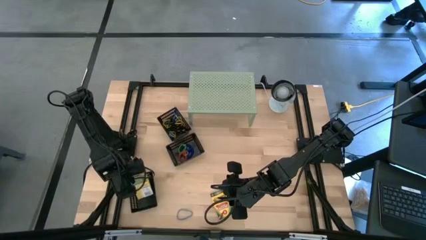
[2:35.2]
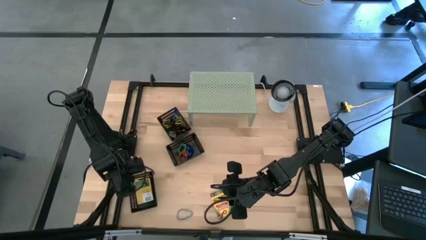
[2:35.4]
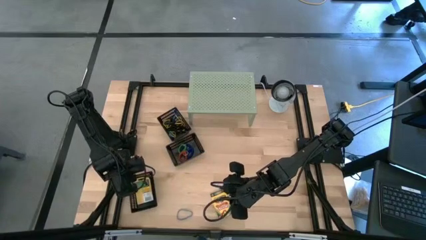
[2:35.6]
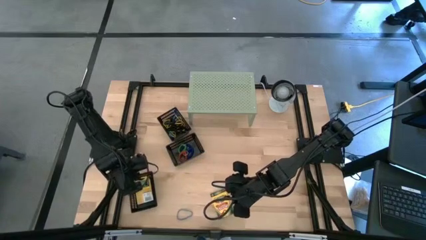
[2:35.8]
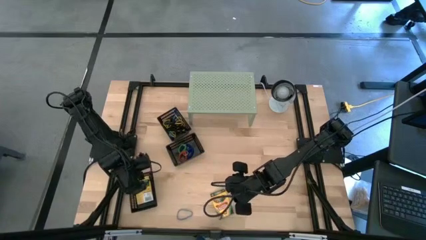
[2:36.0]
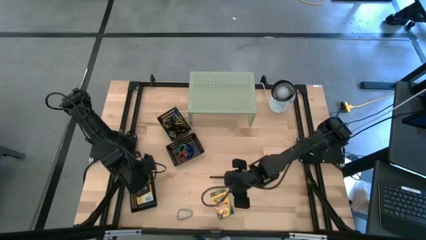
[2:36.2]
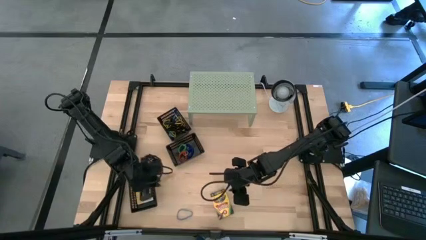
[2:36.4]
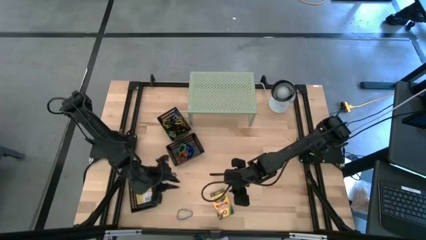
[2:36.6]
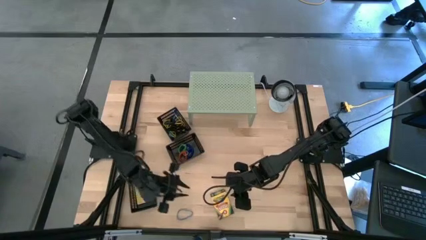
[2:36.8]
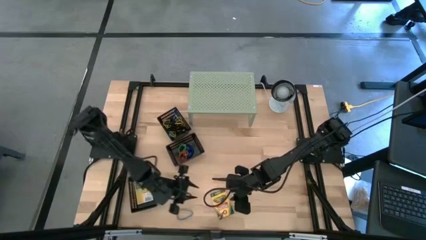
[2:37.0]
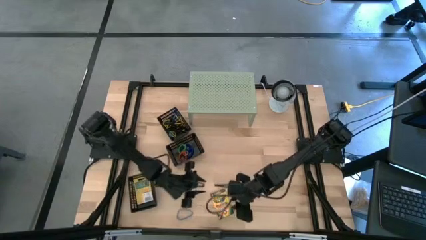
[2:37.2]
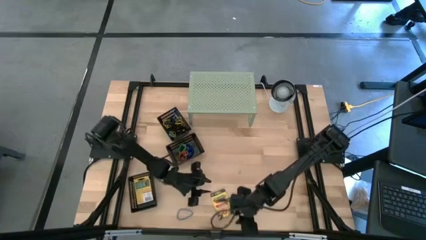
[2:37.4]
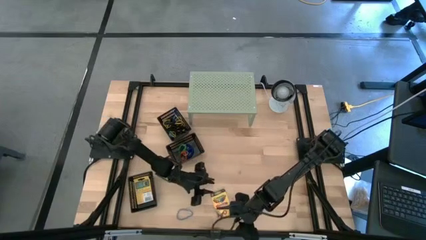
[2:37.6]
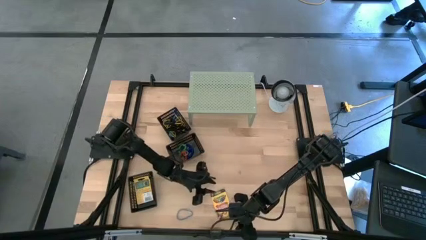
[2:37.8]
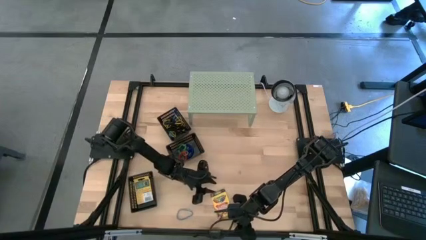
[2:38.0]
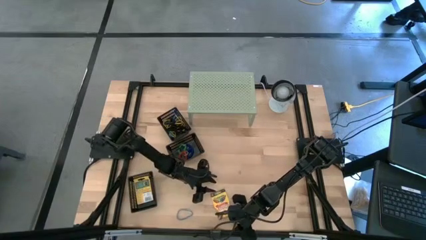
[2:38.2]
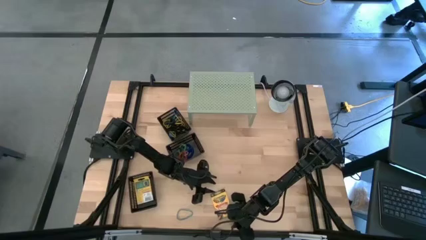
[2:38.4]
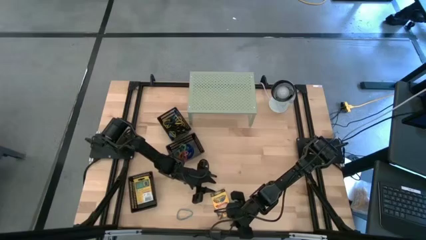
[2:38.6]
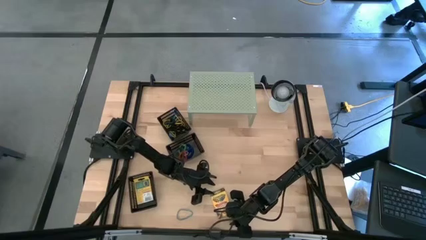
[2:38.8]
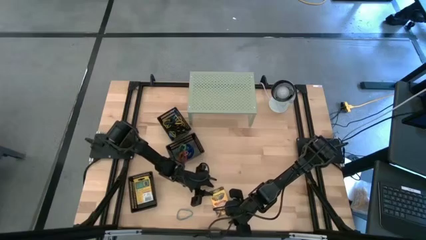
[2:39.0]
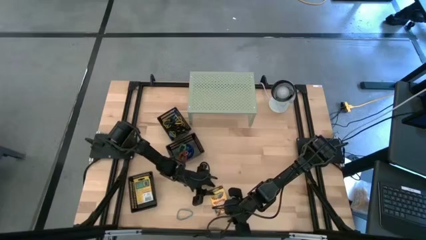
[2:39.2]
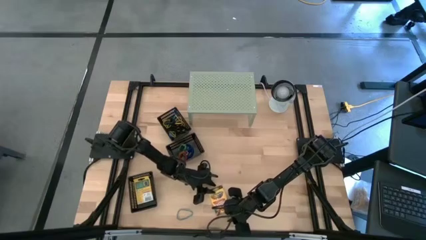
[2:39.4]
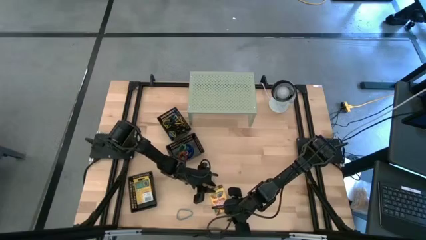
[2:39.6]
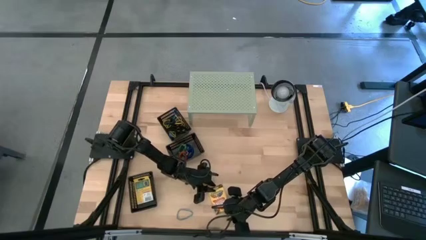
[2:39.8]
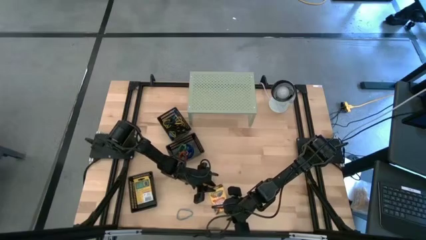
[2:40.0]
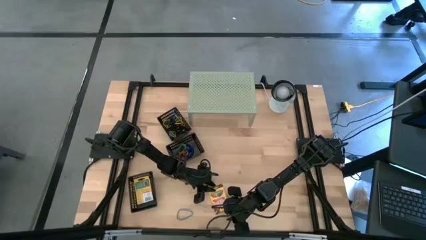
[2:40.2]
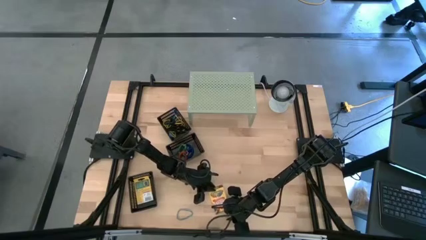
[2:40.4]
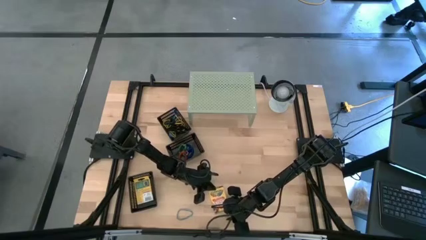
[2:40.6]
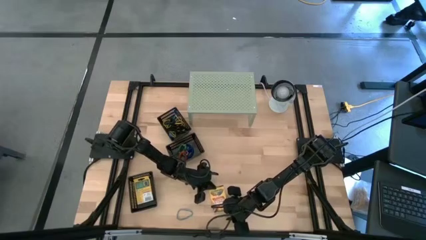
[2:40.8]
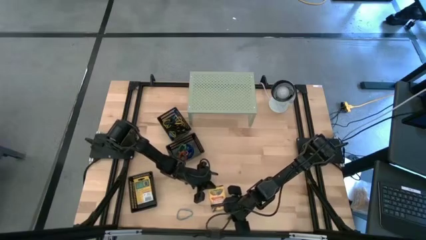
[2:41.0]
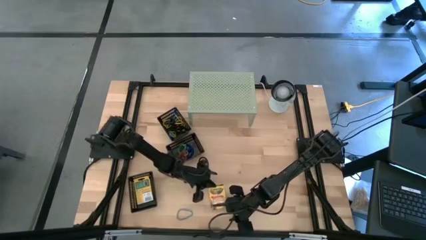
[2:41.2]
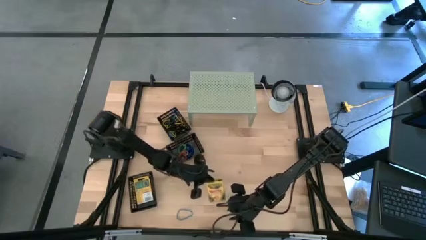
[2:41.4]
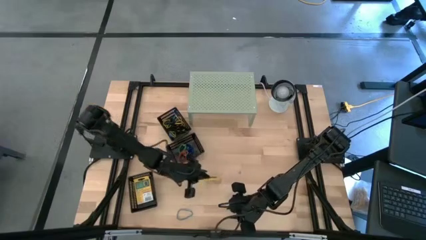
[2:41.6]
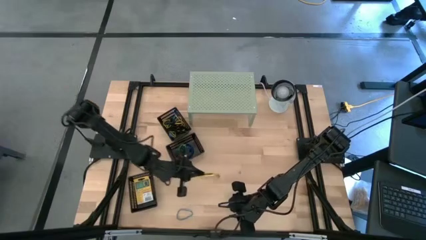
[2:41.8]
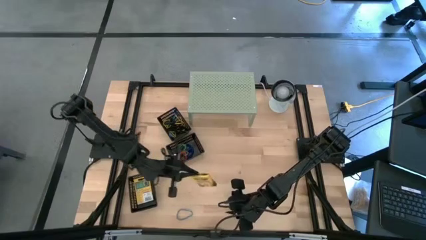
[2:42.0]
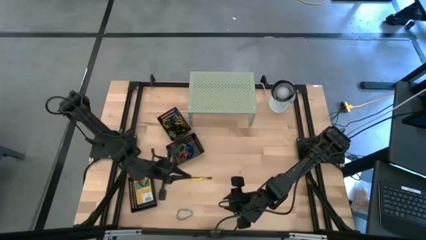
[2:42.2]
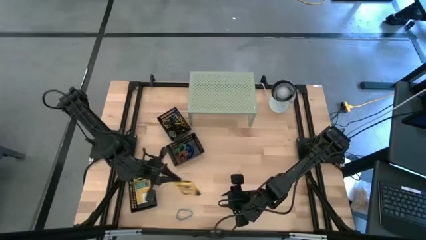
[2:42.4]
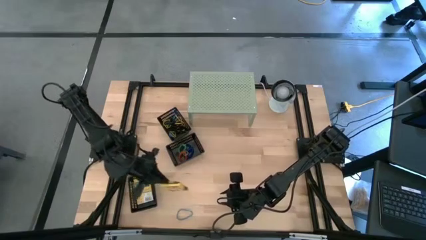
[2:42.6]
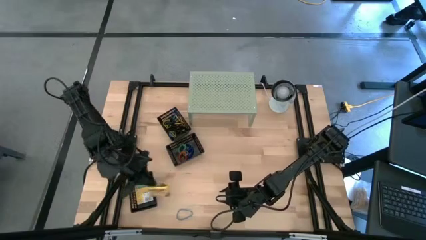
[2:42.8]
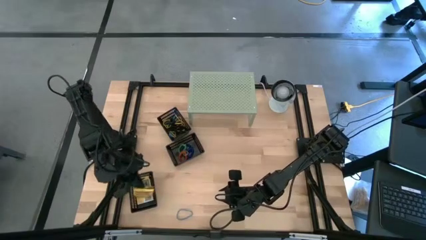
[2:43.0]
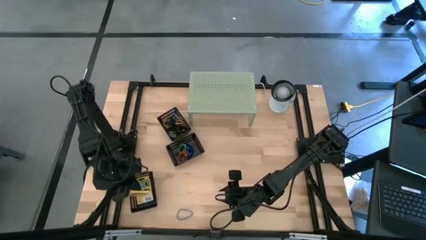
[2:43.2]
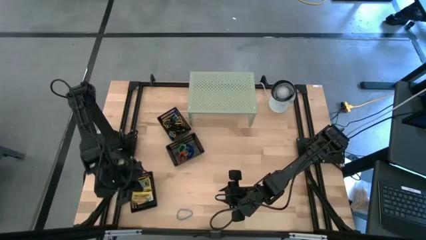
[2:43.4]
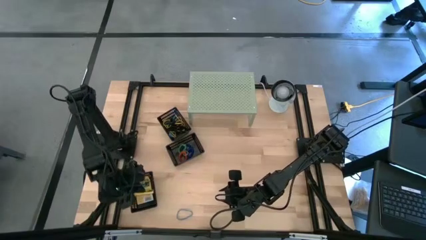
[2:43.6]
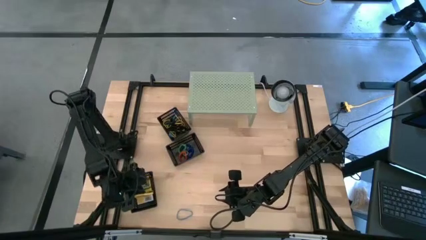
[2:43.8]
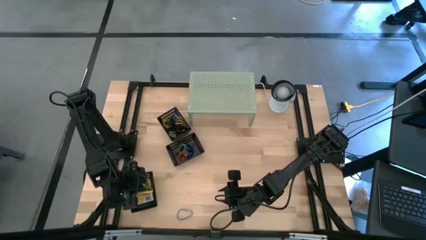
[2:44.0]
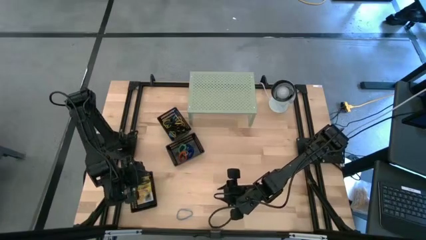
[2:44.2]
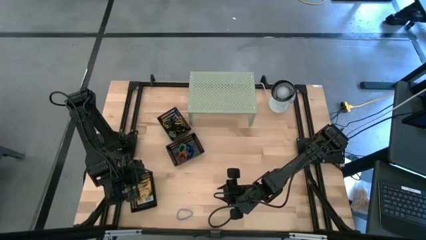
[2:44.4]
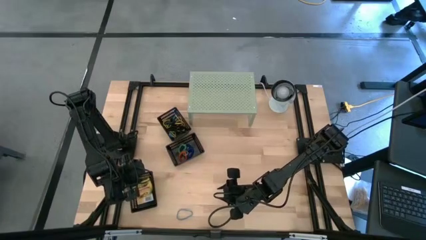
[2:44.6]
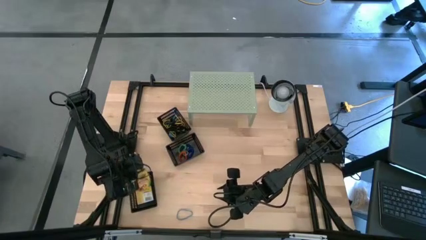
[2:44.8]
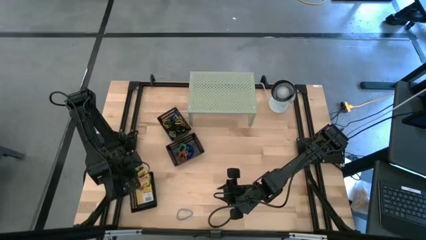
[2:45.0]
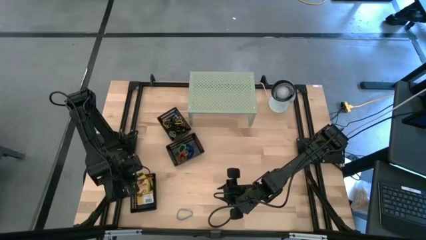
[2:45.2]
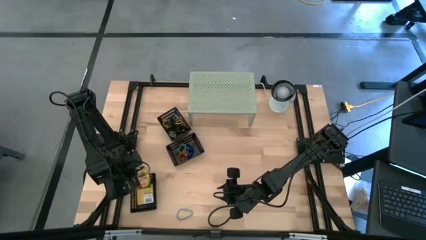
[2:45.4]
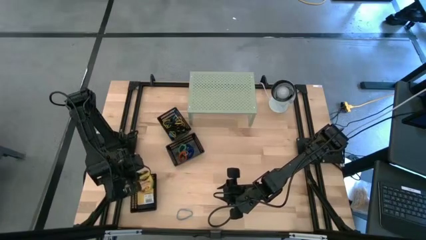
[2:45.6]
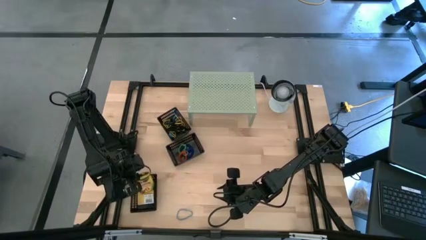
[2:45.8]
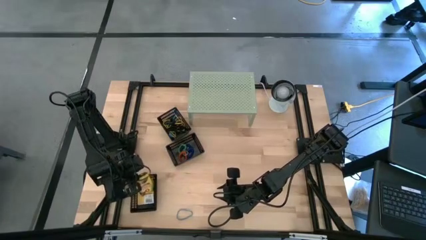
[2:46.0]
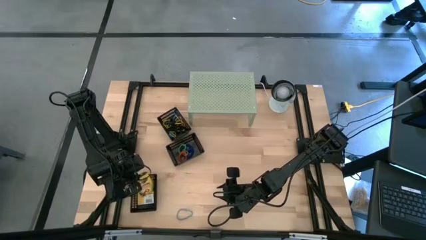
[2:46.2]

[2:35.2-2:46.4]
Task: Pick & Place Office Desk Supplies
Put the pack of crayon into the bottom black bin

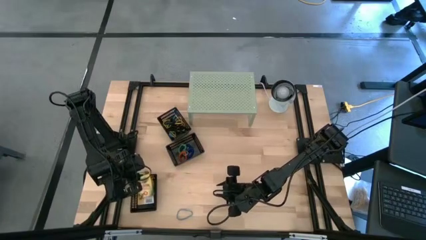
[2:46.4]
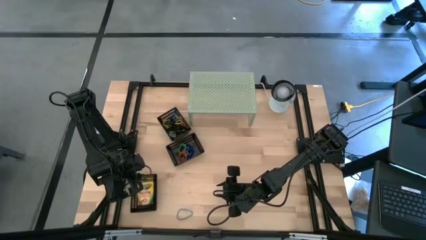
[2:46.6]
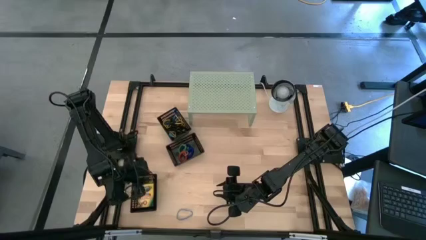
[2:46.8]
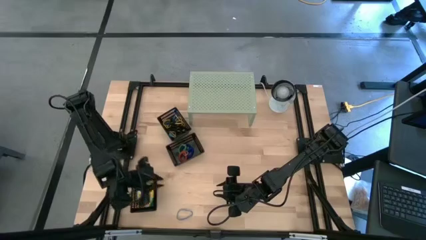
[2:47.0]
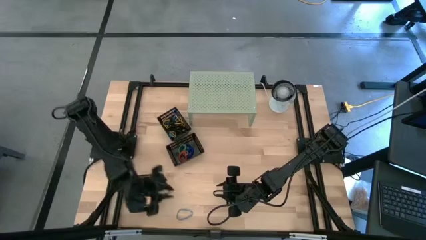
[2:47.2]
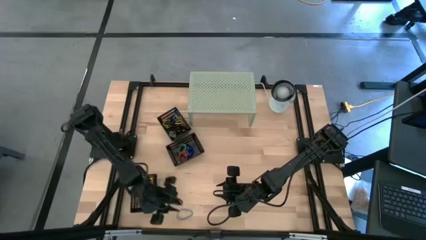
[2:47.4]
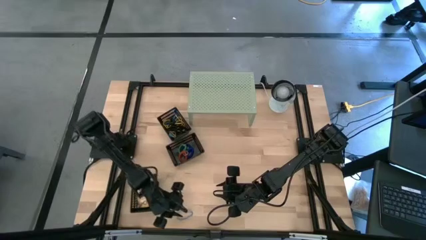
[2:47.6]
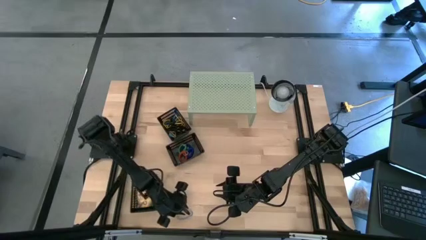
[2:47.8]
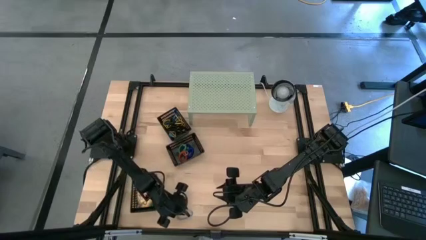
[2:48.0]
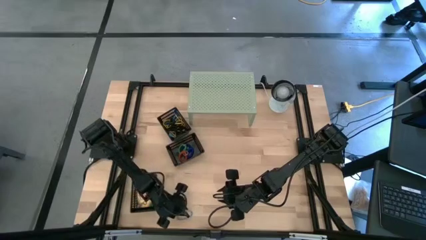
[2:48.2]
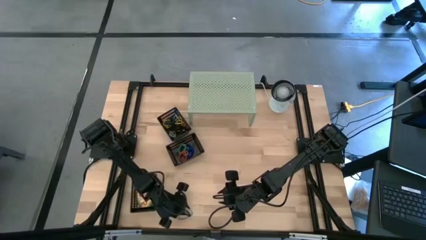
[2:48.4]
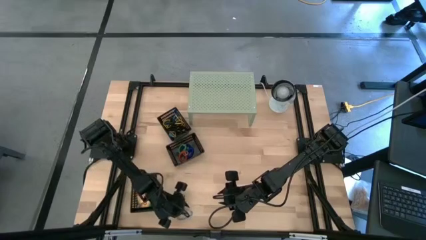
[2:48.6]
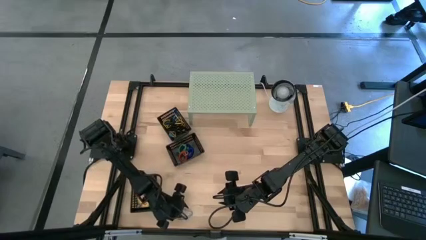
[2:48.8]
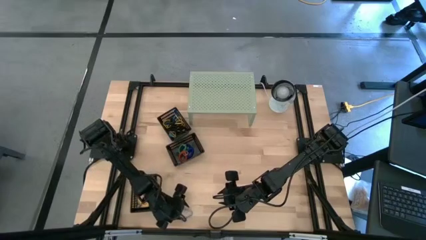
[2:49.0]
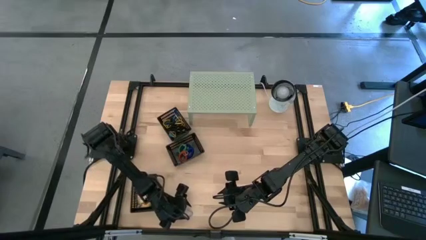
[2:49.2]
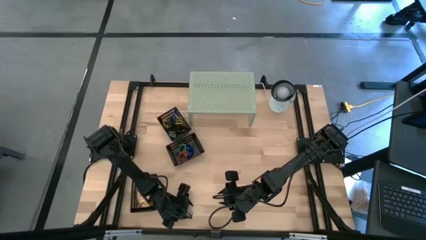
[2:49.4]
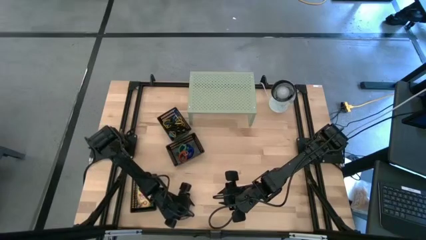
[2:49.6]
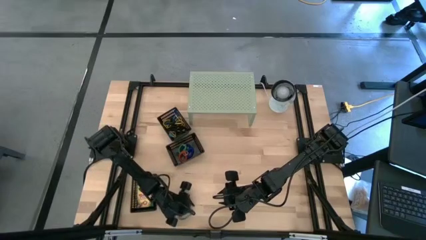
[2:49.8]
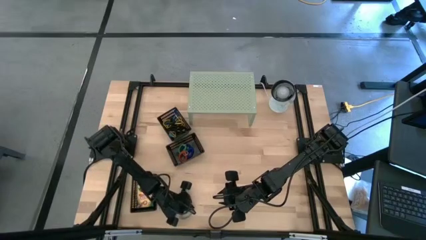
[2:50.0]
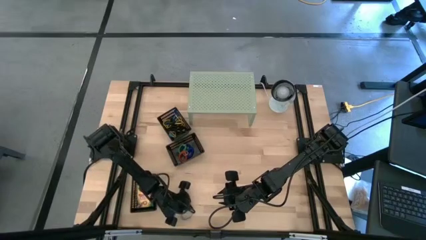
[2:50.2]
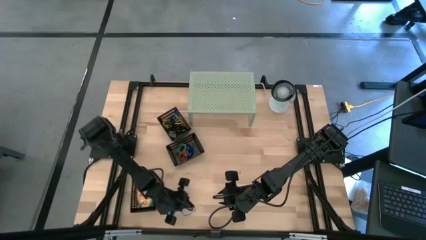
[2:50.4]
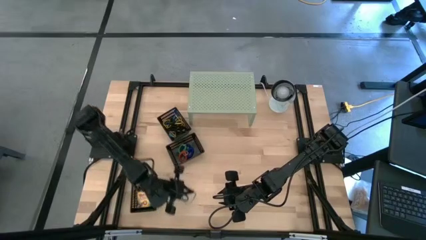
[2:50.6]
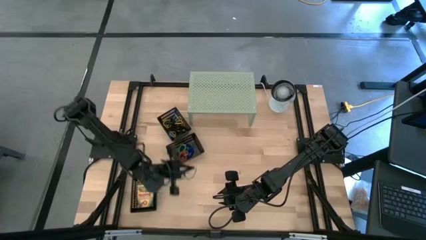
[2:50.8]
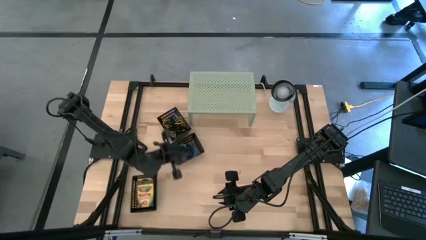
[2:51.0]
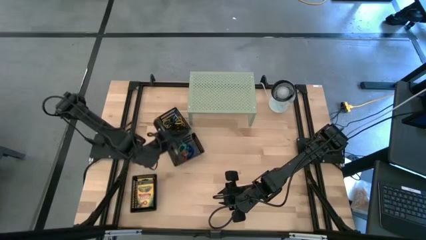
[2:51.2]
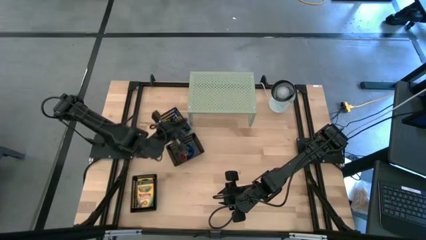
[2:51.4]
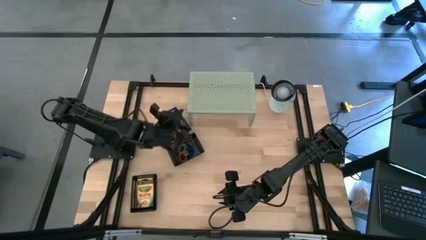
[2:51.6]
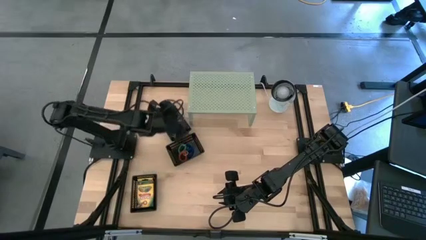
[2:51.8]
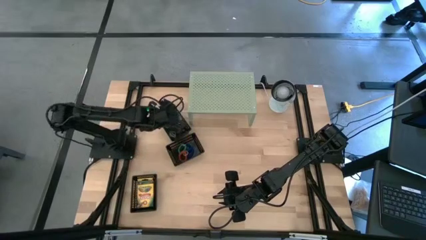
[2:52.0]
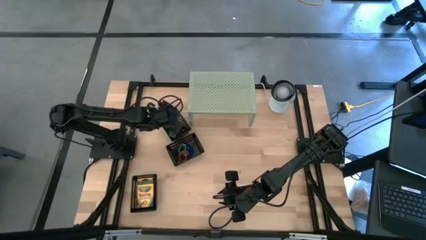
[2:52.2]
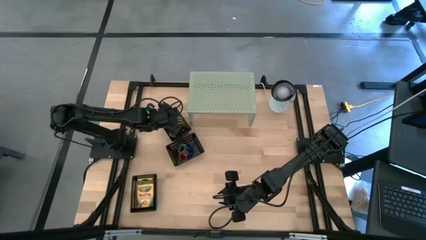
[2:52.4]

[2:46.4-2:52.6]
Put the blue rubber band into the top black bin
